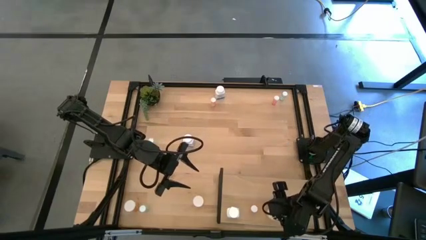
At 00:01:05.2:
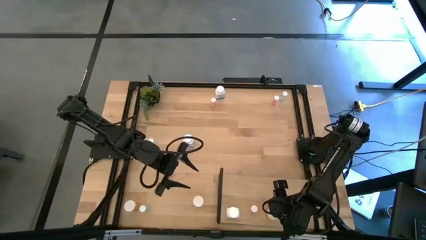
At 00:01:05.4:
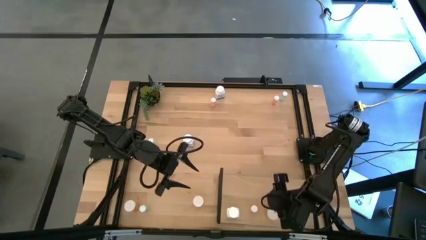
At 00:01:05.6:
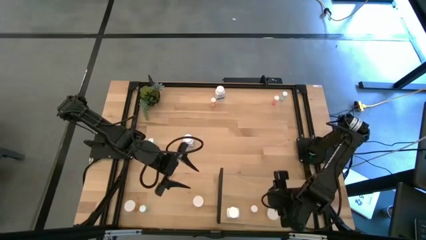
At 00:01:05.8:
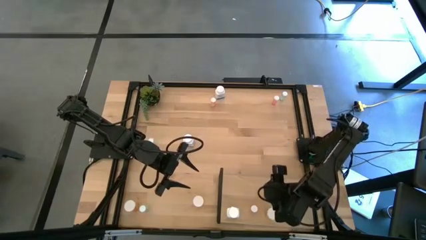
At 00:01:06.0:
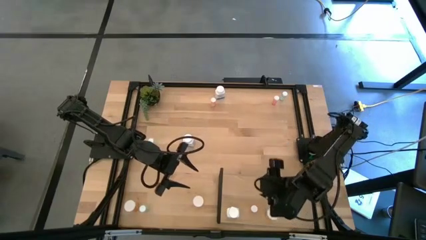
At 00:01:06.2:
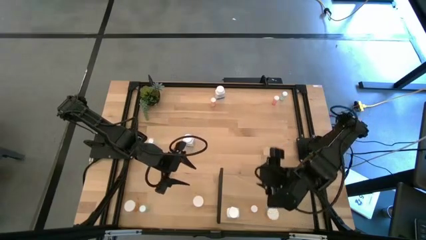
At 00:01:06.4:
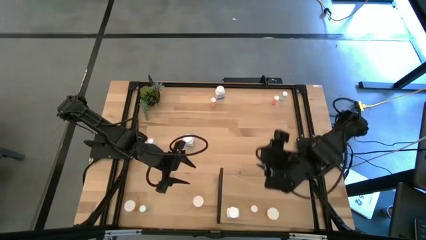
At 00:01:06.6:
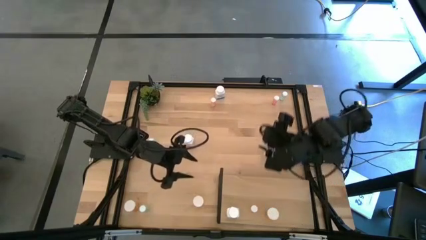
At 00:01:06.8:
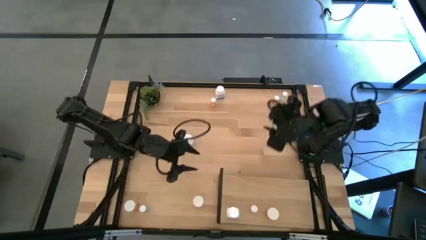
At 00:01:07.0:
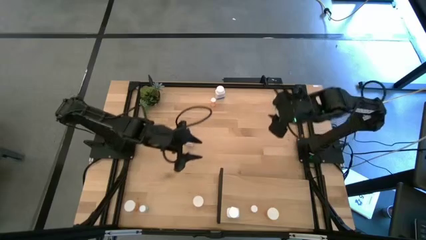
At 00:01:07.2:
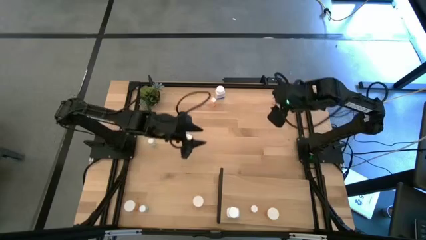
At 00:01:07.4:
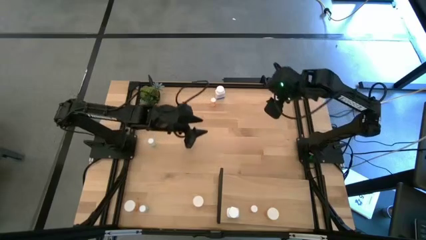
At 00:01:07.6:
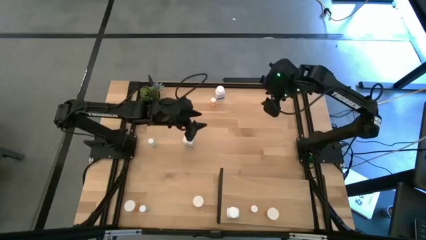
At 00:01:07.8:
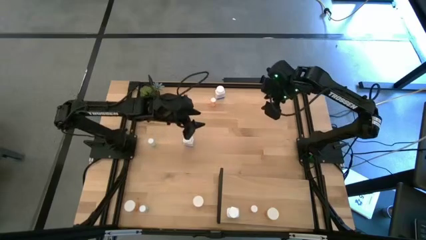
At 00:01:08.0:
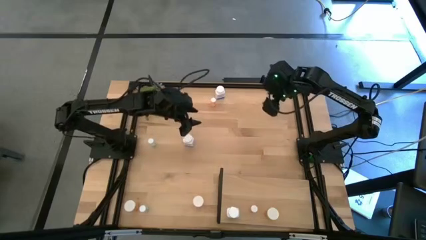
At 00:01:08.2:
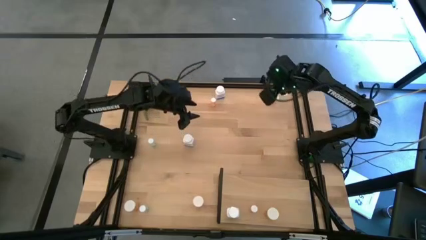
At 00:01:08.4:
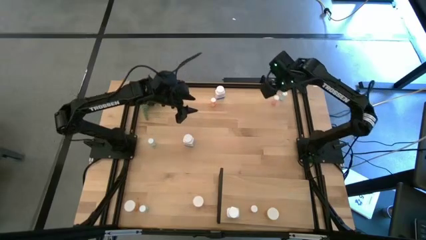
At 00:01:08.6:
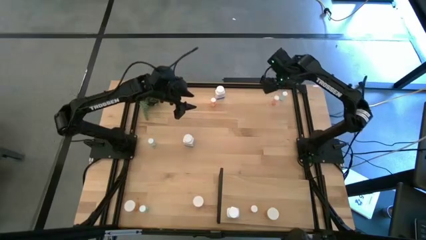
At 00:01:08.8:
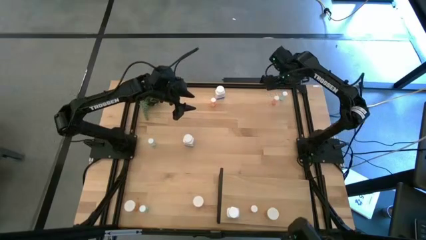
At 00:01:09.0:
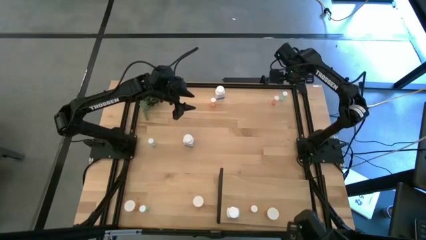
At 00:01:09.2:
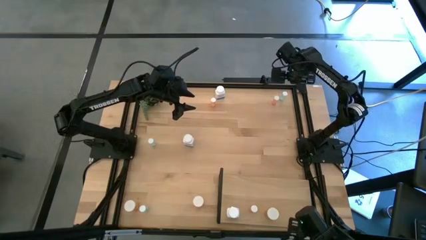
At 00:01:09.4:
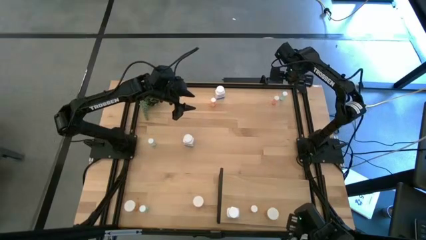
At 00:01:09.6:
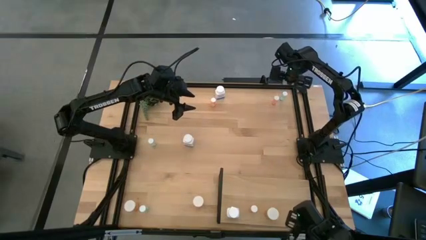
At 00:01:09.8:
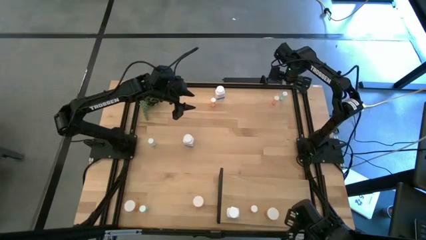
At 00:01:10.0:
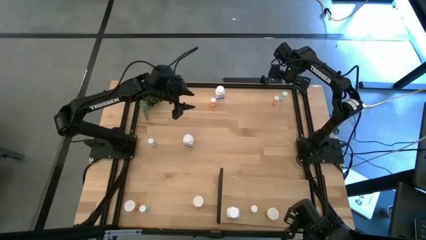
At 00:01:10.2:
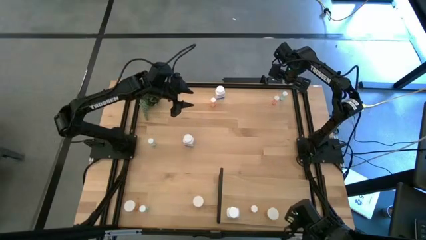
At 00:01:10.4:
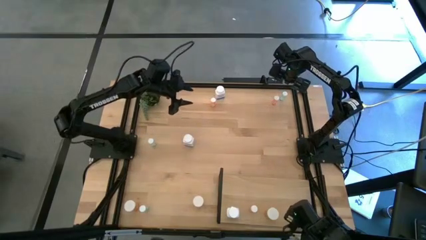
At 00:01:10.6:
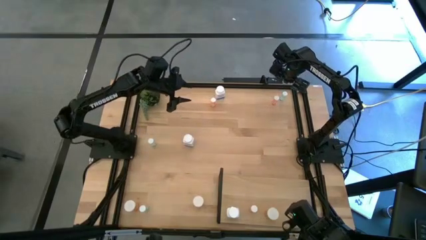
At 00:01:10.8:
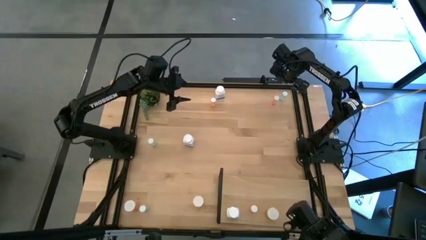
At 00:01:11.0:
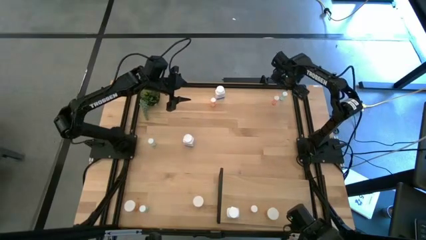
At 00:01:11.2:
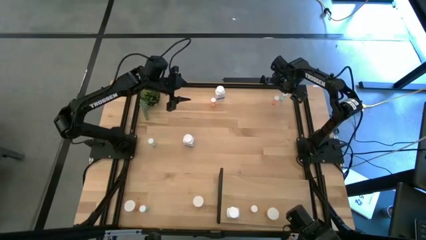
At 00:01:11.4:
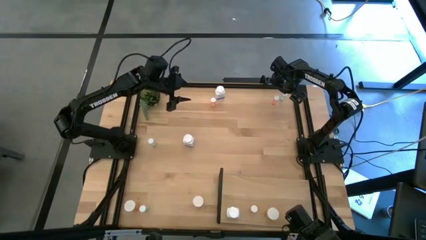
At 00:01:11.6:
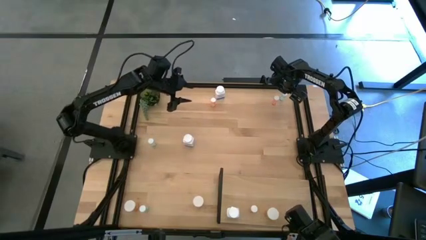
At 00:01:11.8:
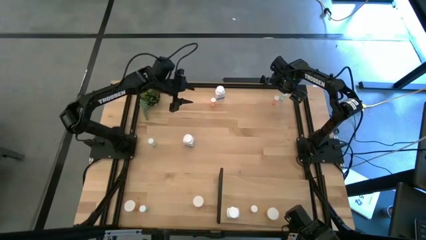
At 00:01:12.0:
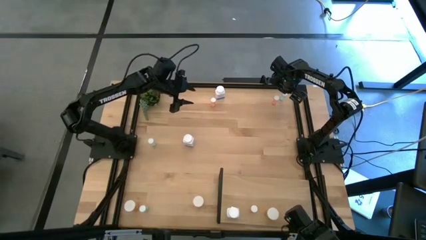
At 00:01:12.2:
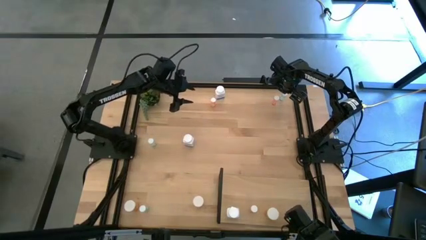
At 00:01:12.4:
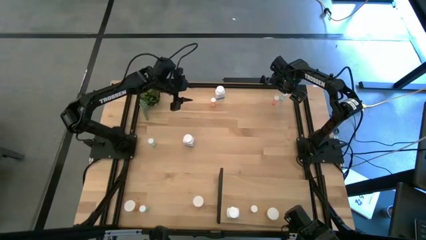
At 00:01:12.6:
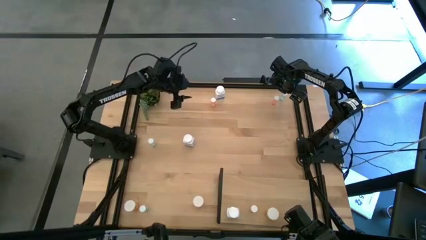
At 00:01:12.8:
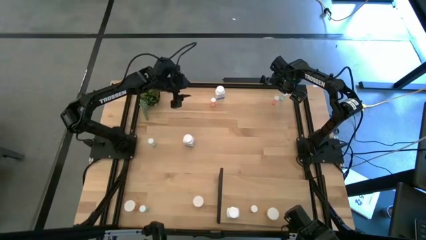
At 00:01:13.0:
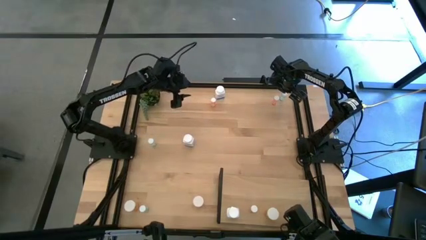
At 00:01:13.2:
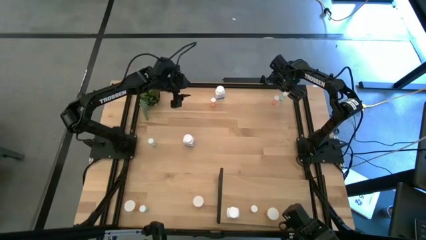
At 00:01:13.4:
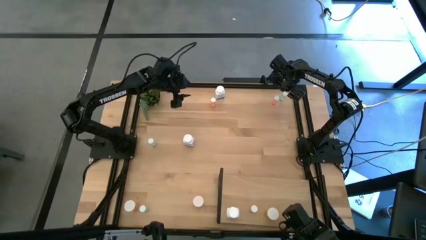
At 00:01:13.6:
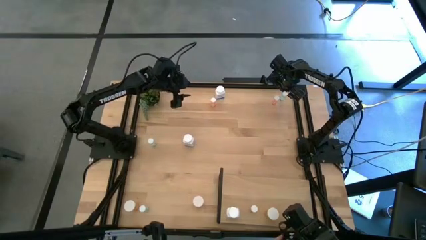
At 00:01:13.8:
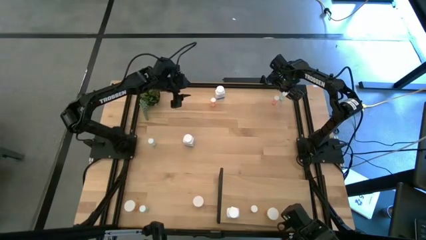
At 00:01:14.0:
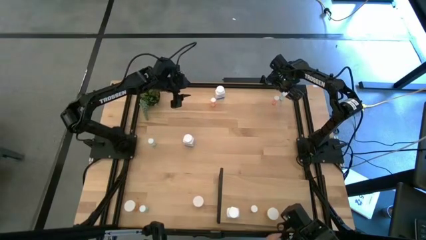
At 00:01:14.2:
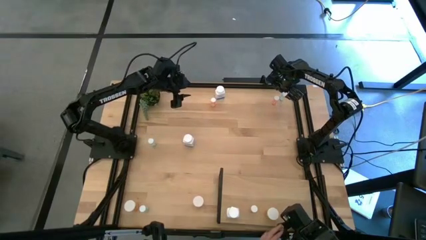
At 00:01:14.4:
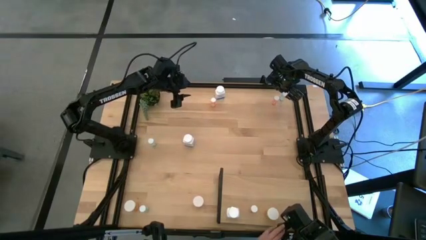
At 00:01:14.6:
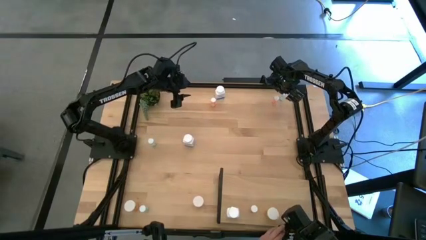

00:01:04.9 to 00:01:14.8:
Task: Pick and place medicine bottles onto shelf by color
Put the top right blue pill bottle on the shelf
